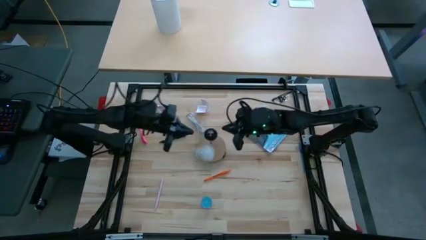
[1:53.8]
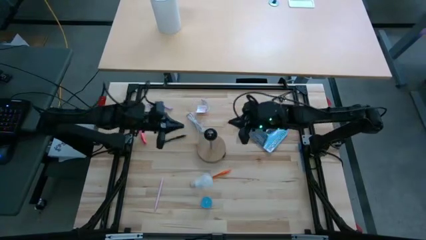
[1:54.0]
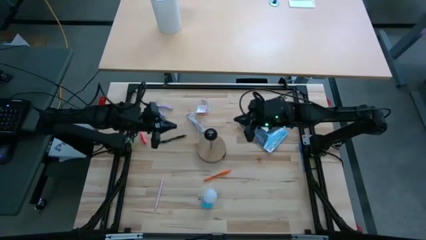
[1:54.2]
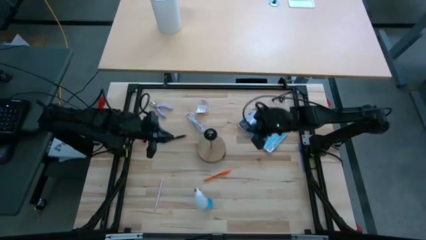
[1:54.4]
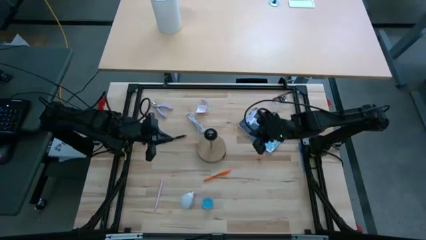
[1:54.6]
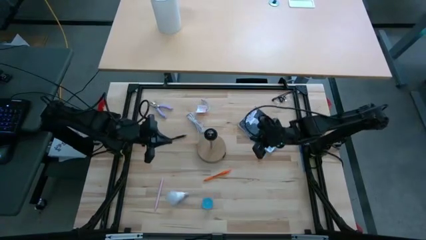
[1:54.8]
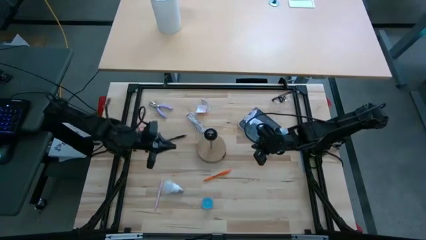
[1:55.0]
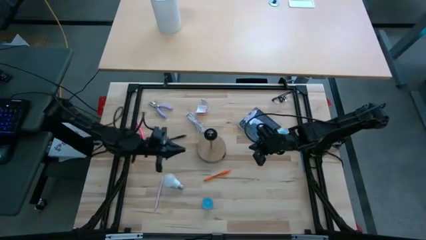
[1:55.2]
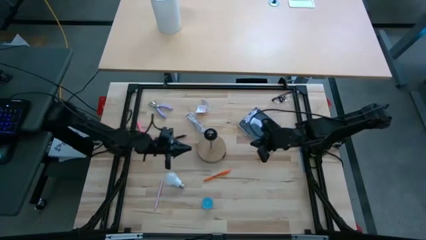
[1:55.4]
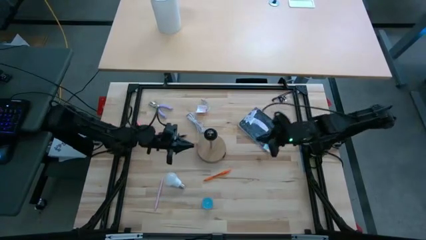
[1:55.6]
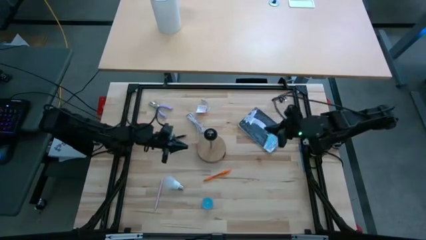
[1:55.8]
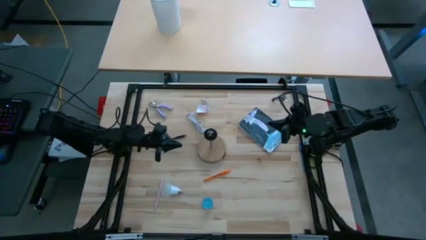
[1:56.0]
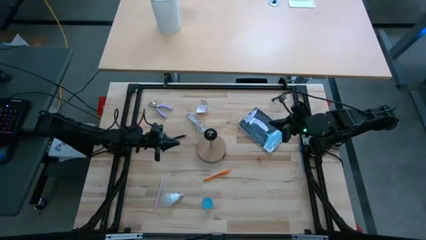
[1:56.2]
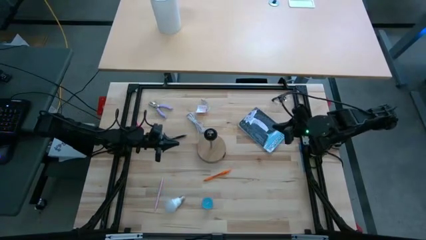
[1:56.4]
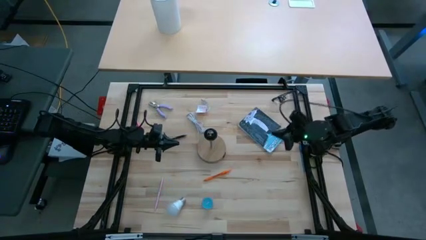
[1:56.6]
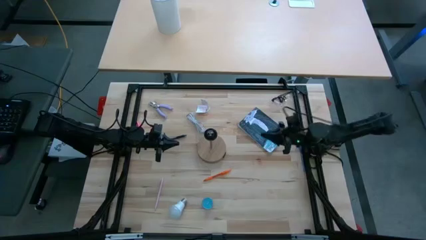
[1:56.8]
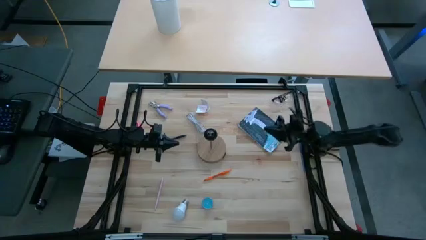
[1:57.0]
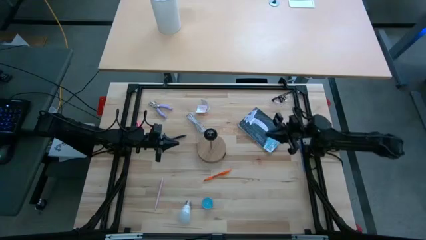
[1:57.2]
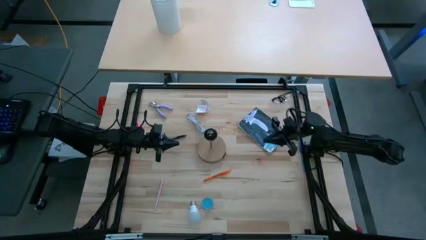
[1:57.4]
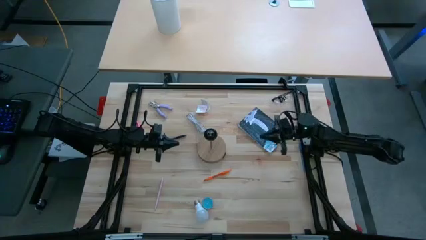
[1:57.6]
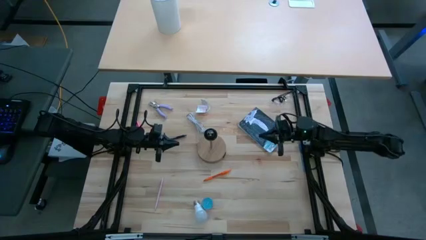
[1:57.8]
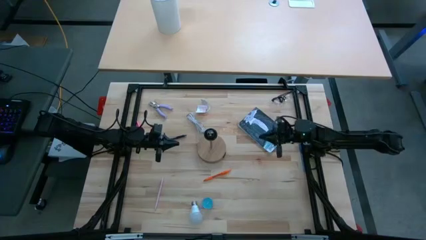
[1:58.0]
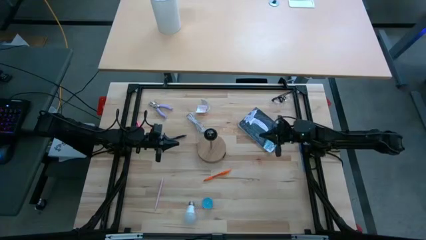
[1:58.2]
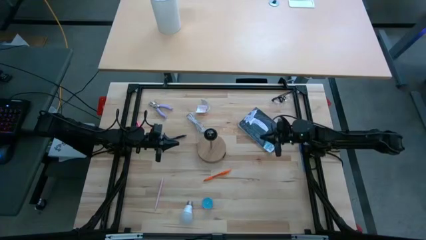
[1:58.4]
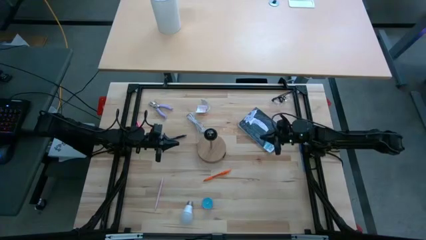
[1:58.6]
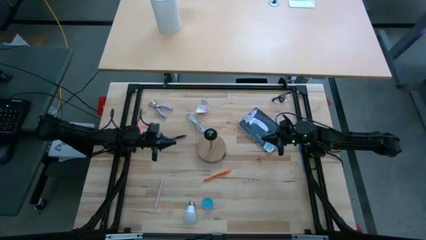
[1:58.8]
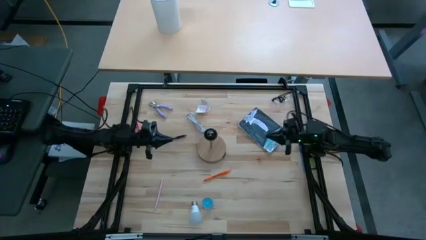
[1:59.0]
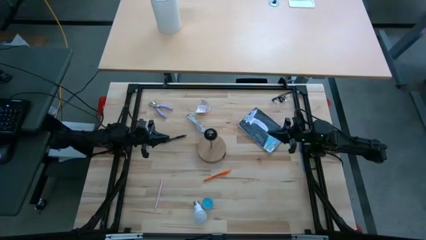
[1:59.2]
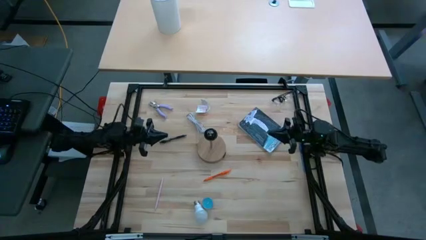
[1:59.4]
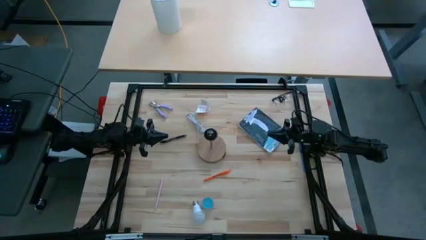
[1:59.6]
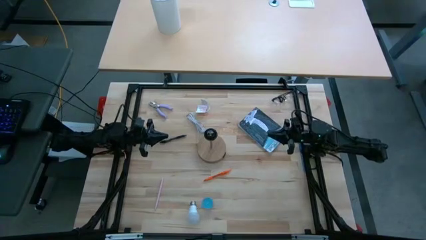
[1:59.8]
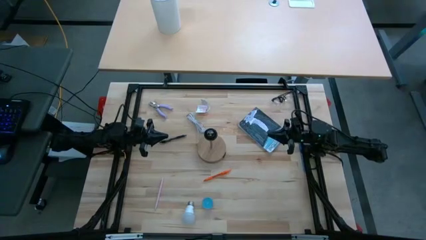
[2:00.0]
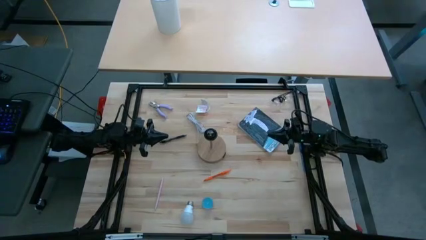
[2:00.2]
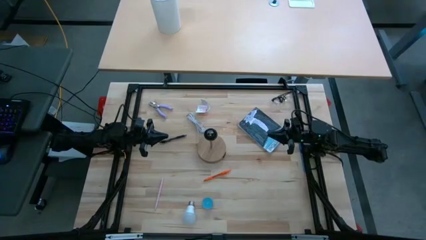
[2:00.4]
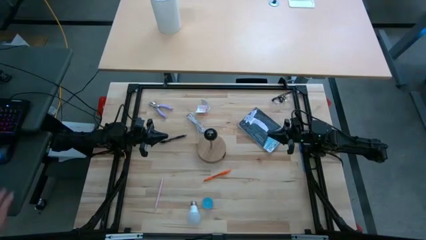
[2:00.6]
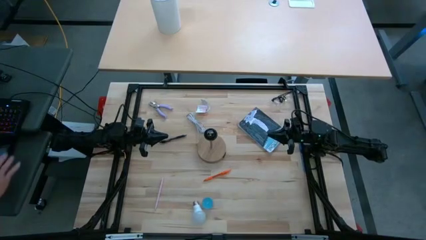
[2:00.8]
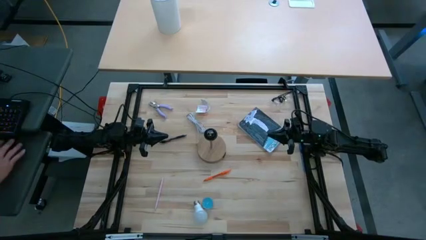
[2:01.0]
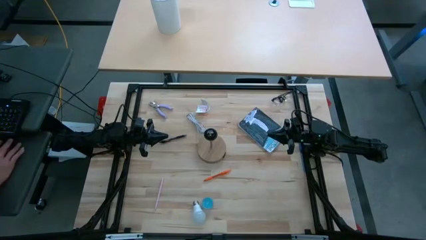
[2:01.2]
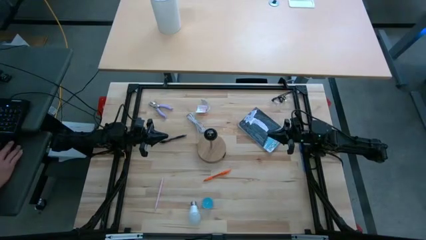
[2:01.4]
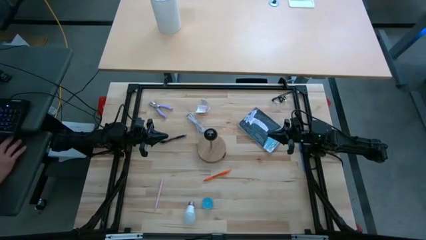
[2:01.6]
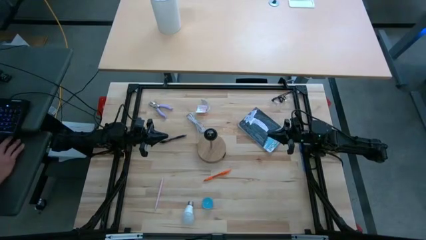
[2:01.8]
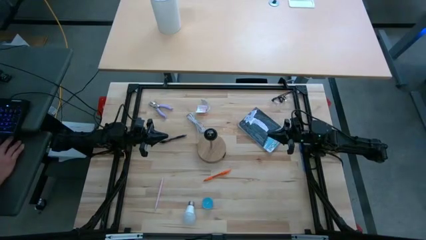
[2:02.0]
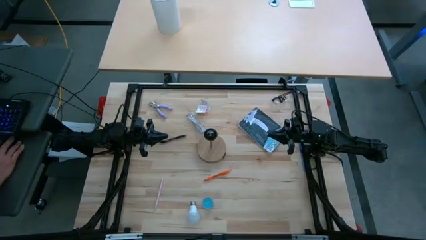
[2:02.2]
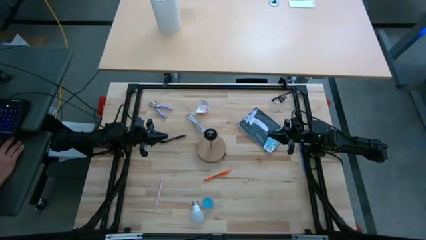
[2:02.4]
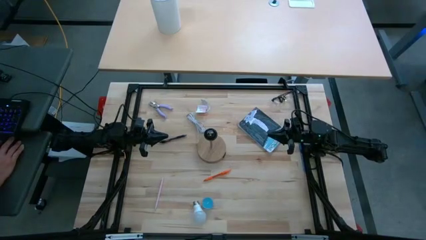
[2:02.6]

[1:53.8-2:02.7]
Task: Screw lightbulb
Return to Home Position

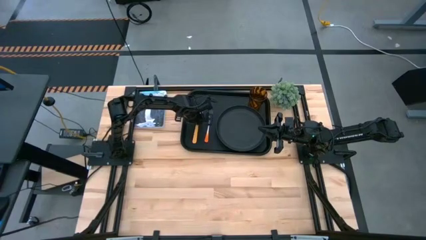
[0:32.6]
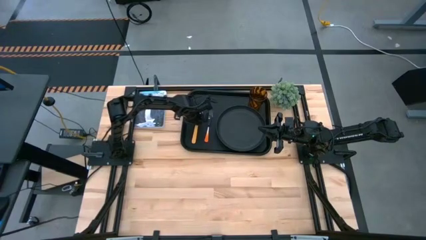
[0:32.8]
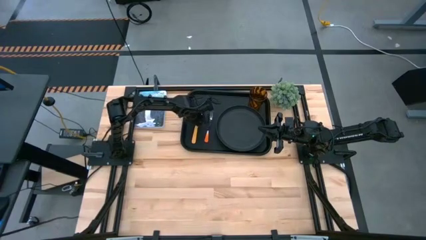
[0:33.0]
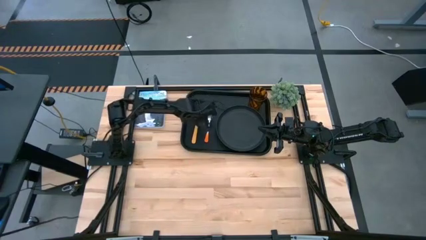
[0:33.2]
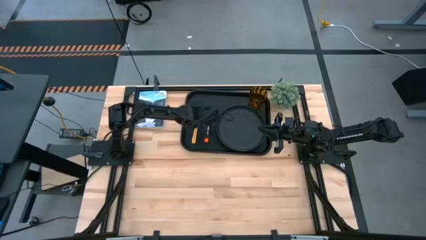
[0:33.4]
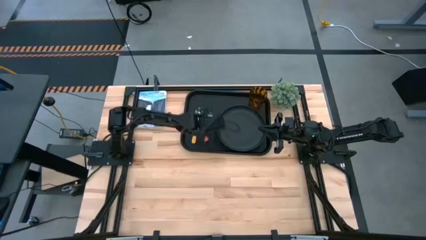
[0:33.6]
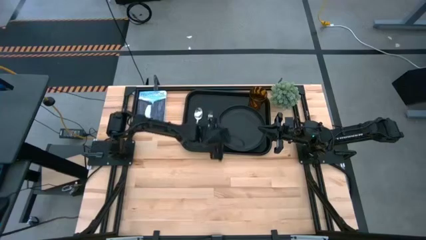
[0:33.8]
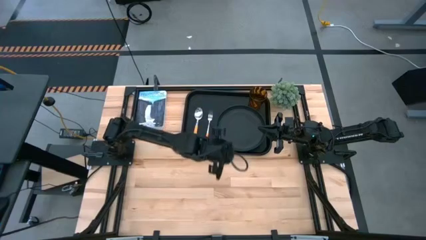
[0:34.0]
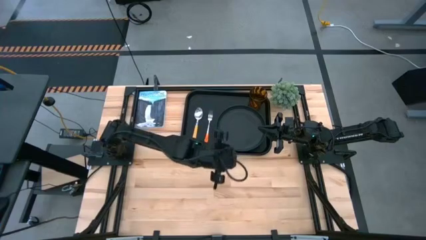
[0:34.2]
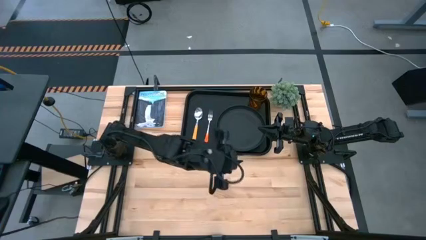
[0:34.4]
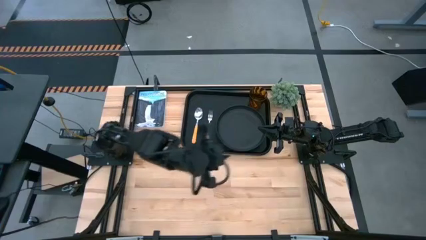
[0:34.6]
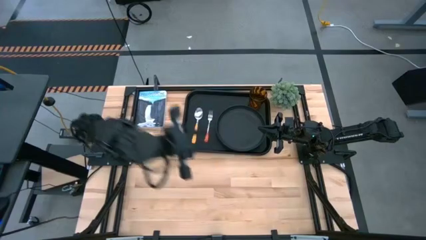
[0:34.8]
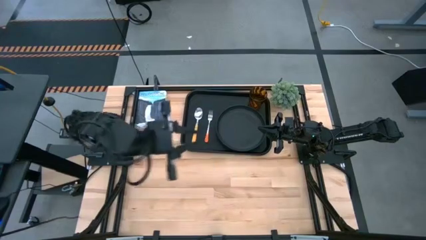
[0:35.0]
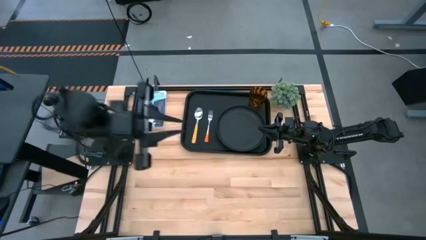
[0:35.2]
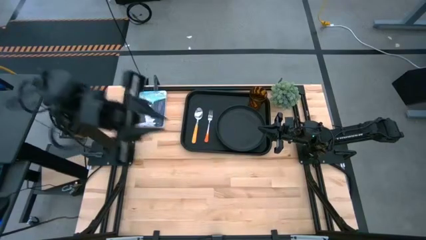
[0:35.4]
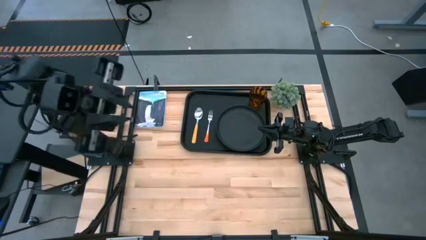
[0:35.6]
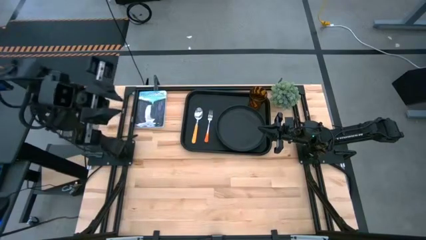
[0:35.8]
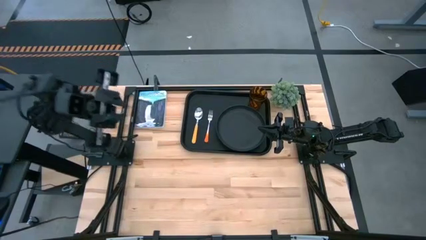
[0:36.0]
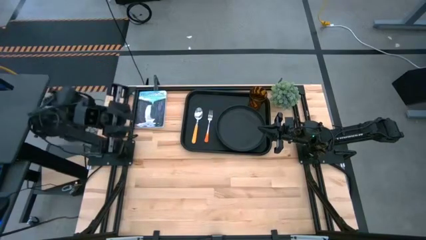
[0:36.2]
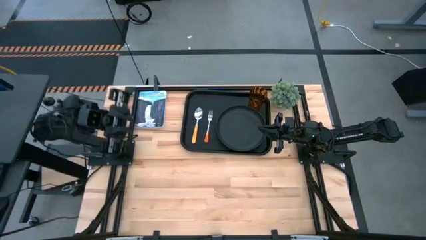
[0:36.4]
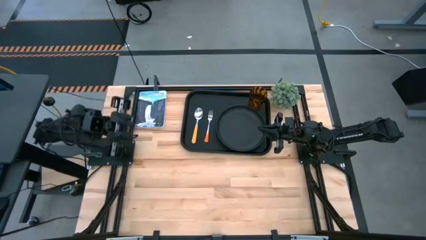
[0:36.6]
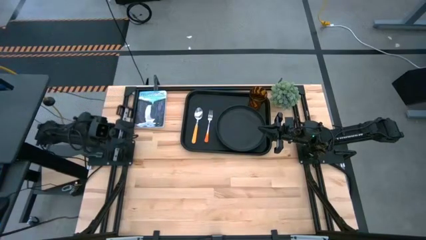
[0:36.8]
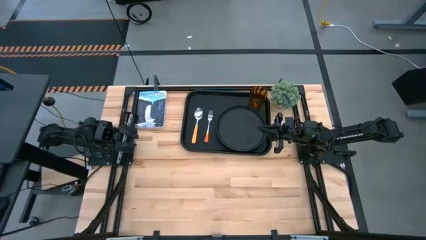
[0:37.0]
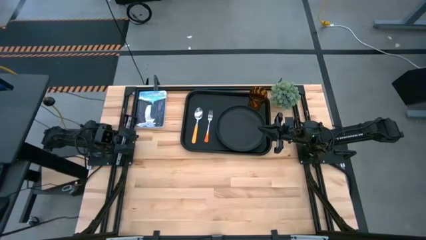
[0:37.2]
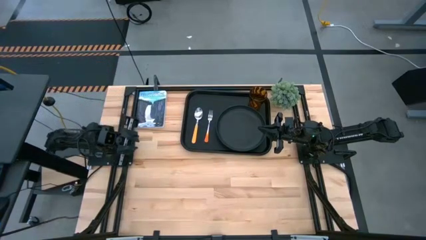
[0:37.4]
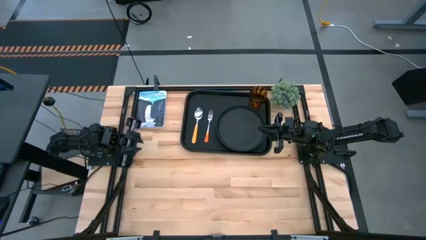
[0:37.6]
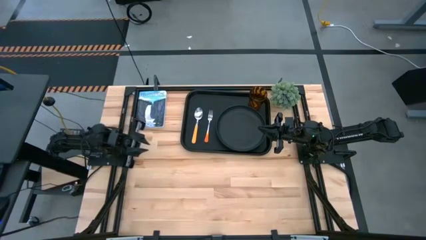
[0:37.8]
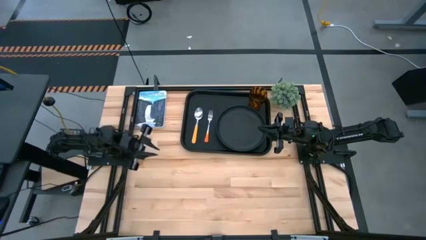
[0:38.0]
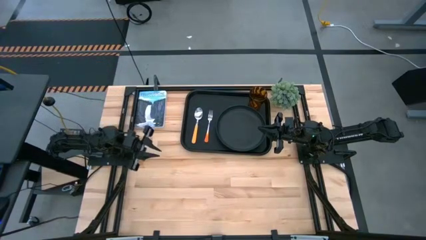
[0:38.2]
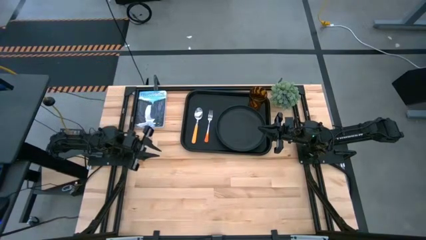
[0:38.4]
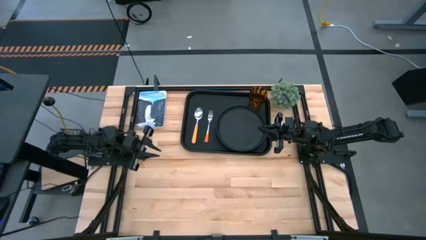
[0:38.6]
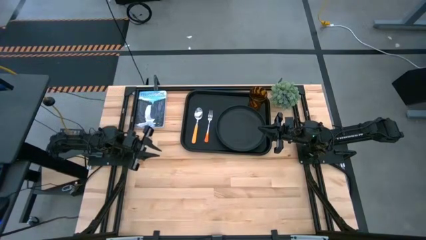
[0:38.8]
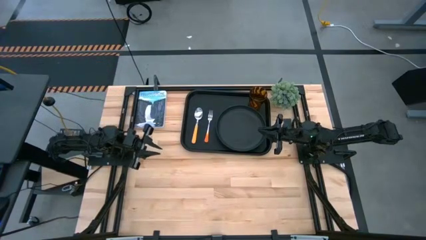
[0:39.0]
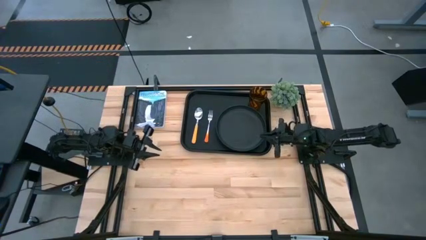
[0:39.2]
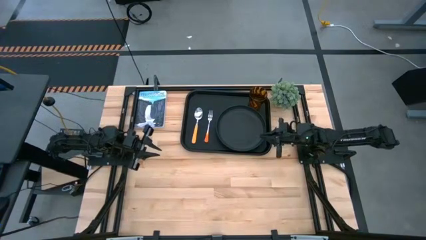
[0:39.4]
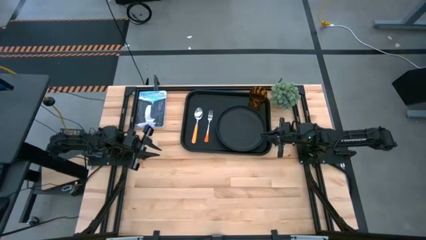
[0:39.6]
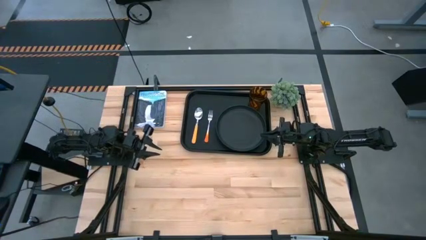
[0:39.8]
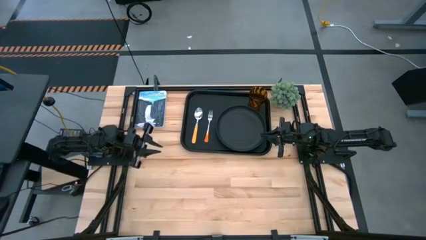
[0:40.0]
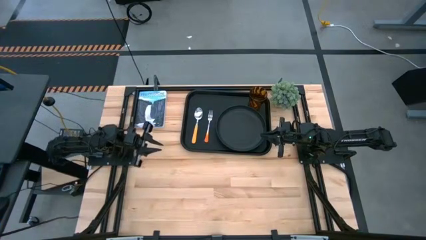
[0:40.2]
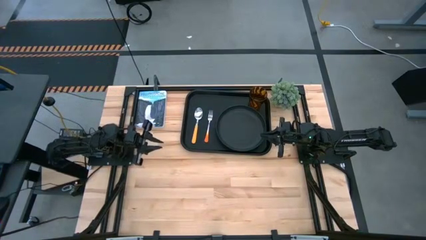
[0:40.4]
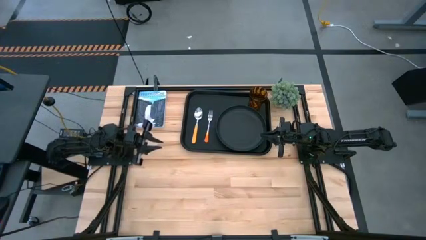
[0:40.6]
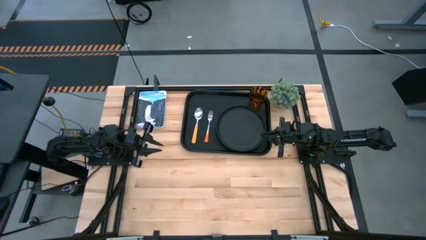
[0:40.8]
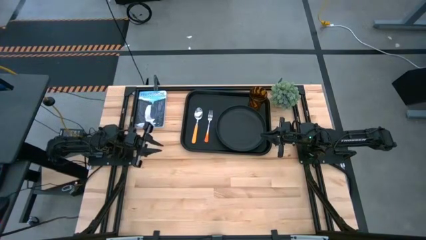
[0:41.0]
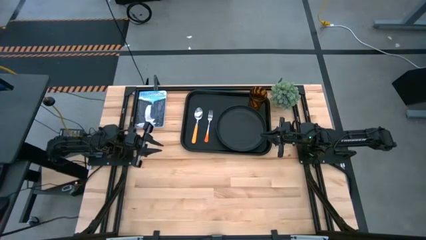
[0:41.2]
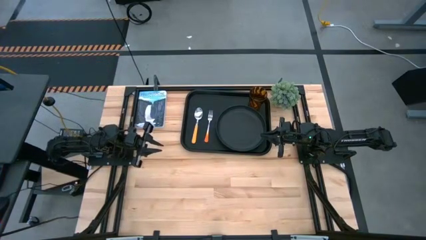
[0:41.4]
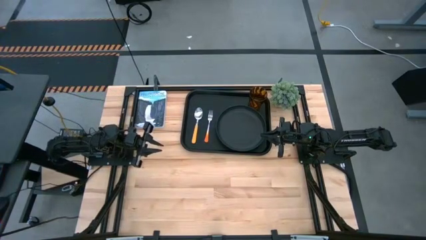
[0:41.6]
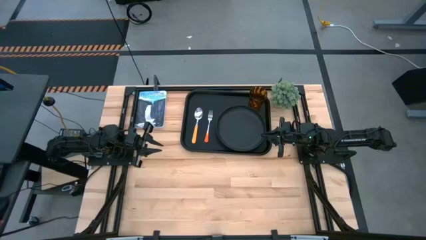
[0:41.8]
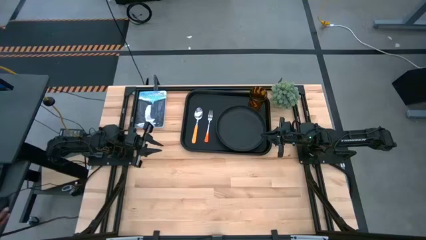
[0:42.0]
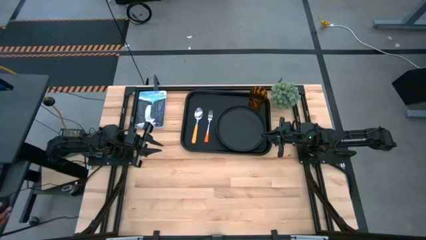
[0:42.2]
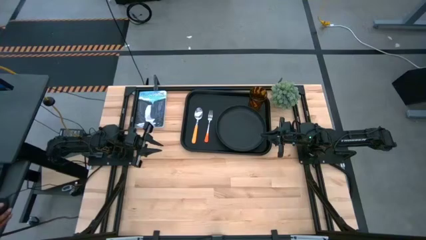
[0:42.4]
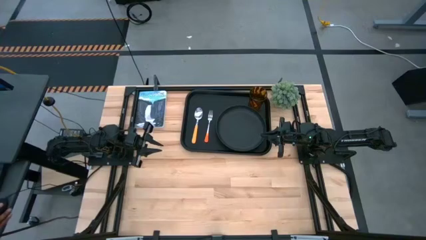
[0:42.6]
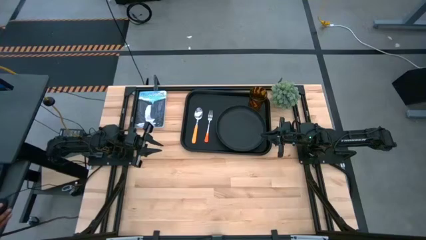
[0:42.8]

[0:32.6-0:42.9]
Task: Pick and place plate/cup/fork/spoon on tray
Return to Home Position
